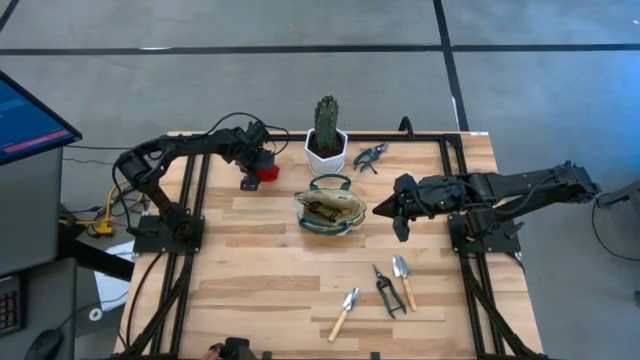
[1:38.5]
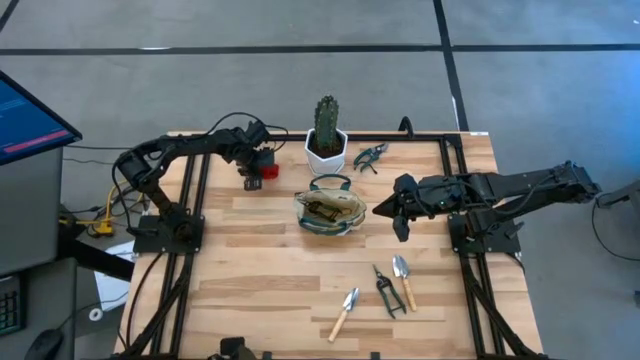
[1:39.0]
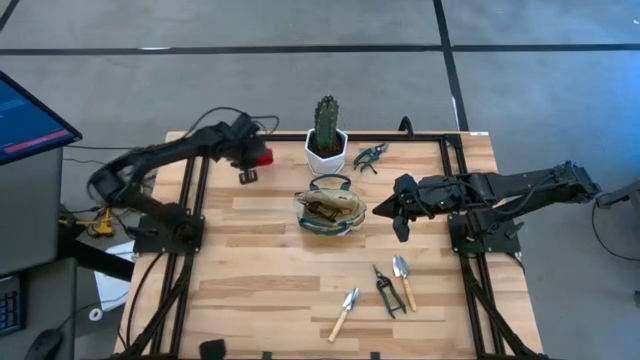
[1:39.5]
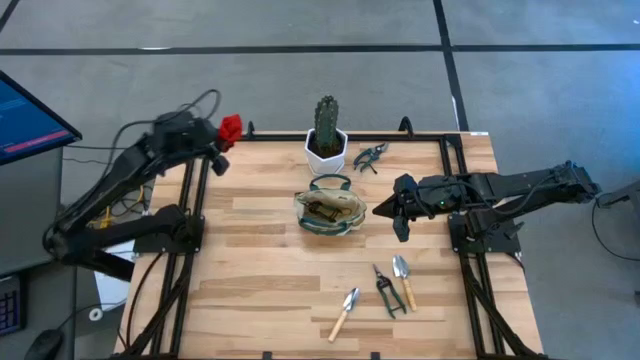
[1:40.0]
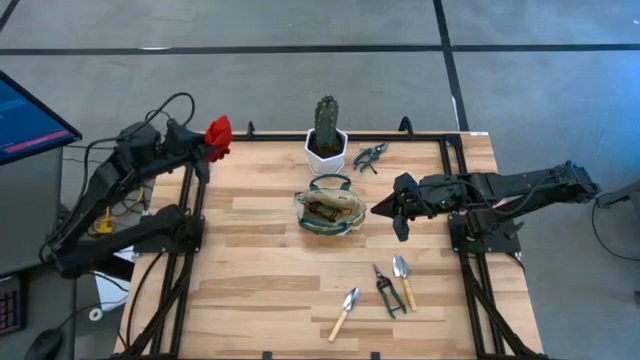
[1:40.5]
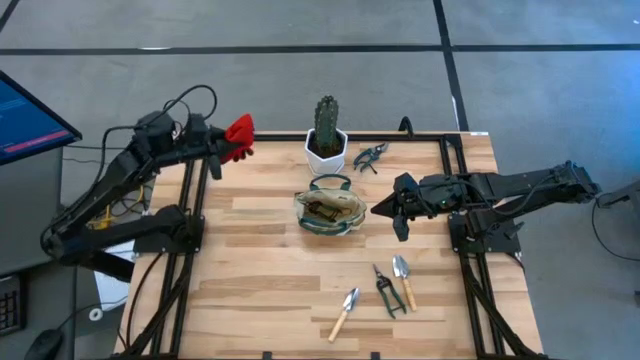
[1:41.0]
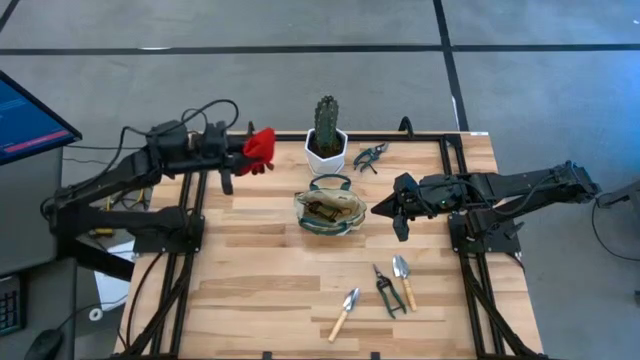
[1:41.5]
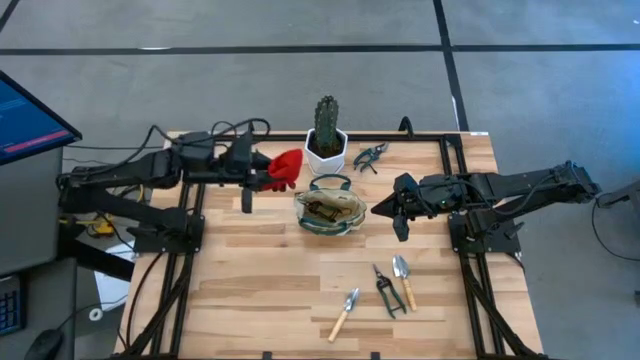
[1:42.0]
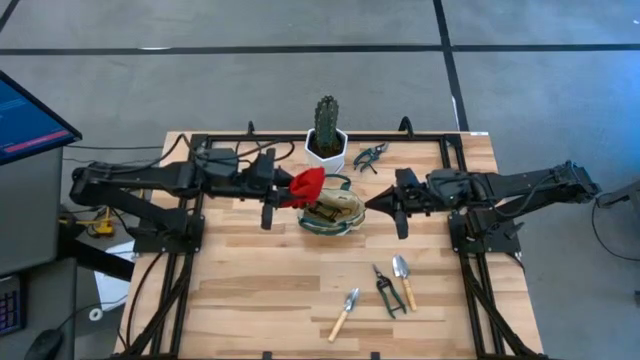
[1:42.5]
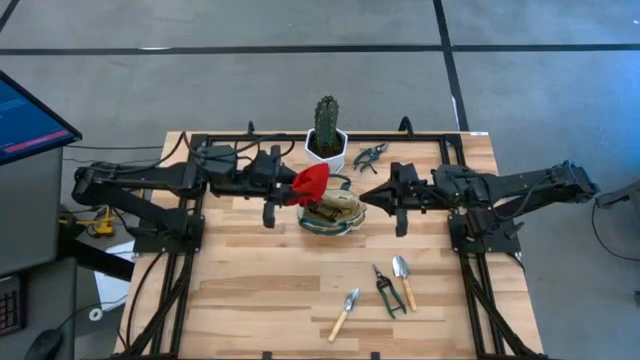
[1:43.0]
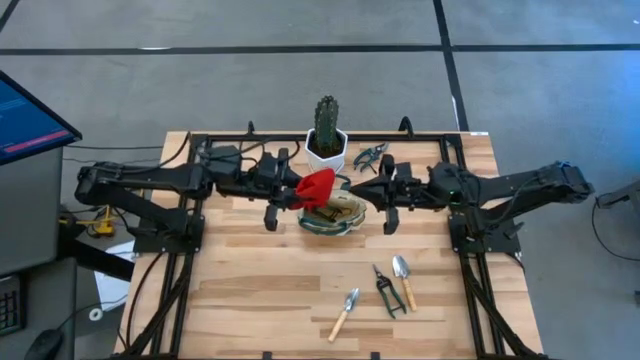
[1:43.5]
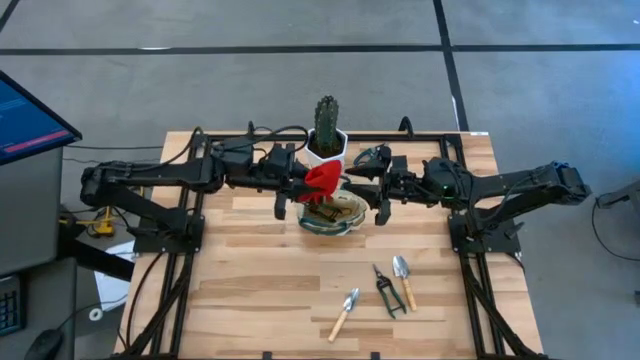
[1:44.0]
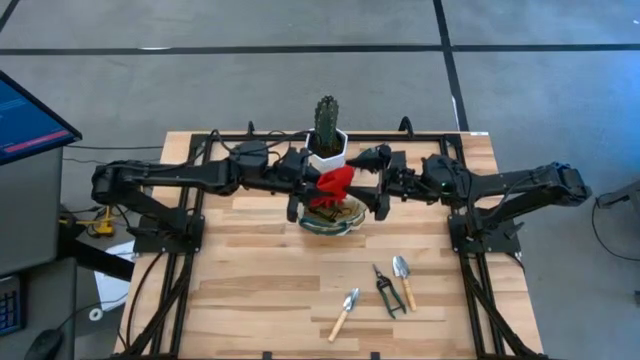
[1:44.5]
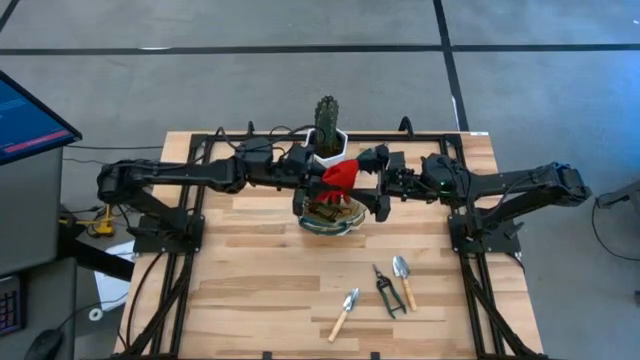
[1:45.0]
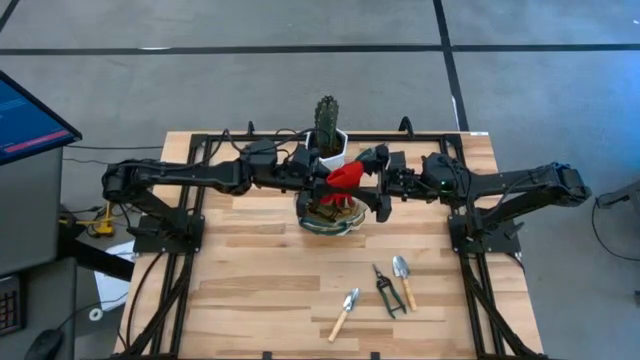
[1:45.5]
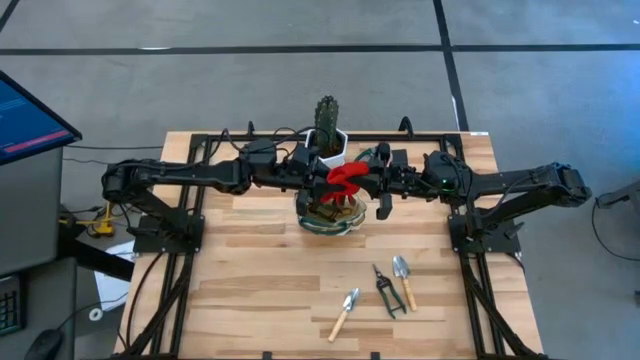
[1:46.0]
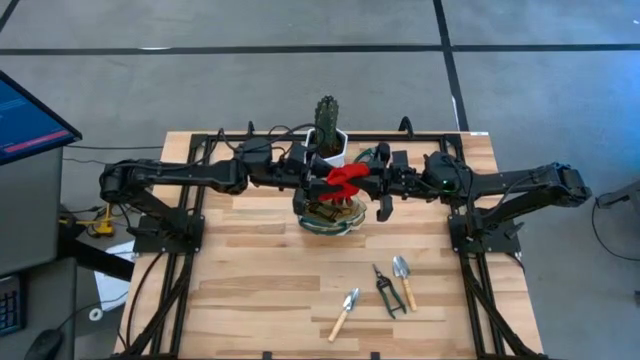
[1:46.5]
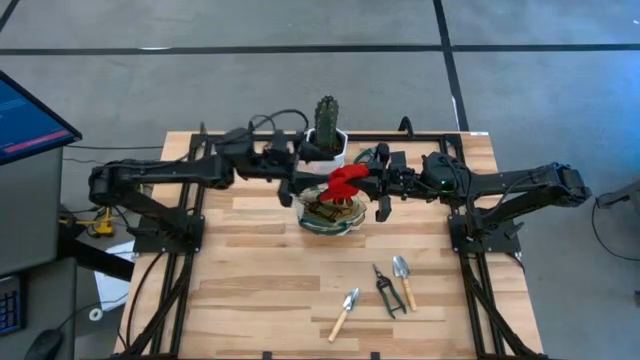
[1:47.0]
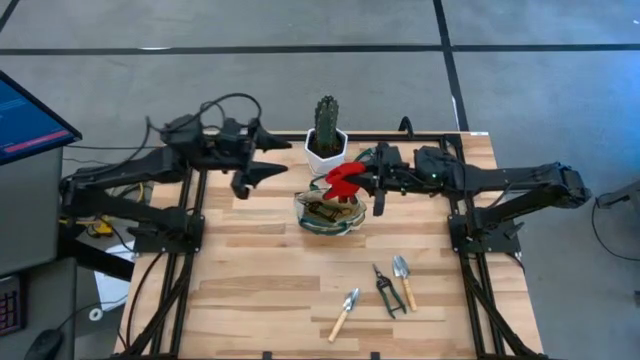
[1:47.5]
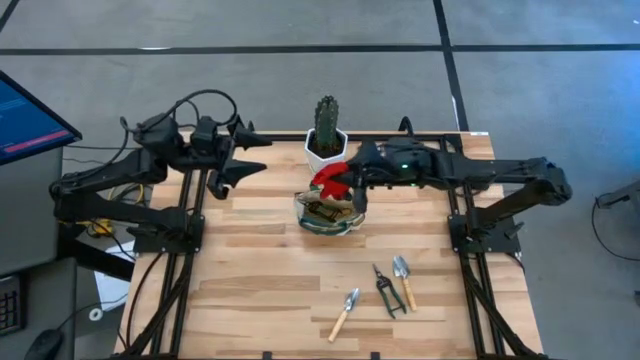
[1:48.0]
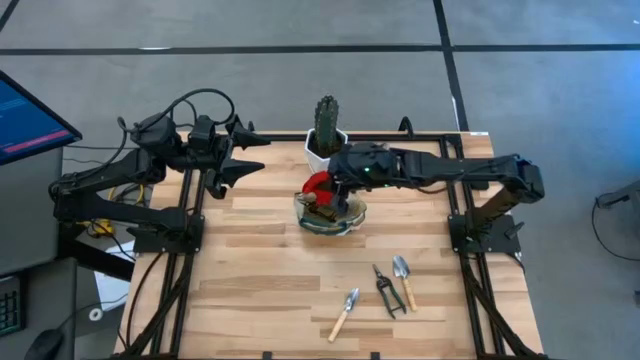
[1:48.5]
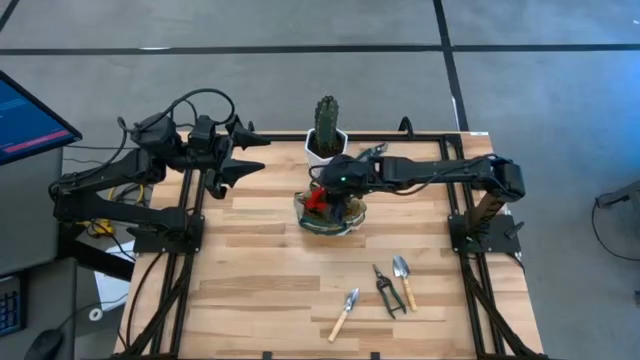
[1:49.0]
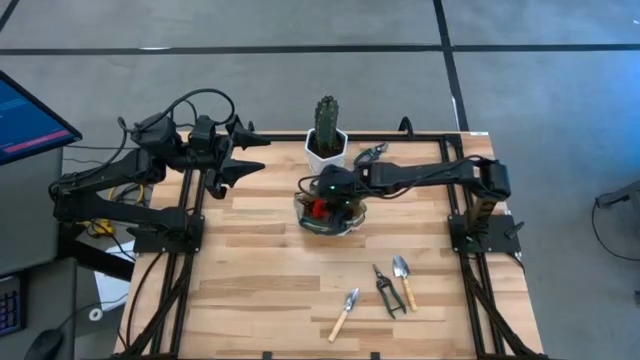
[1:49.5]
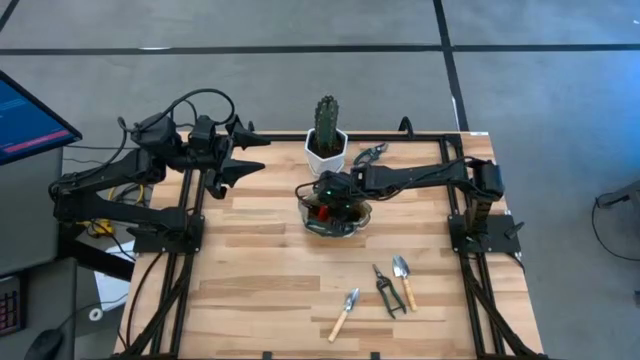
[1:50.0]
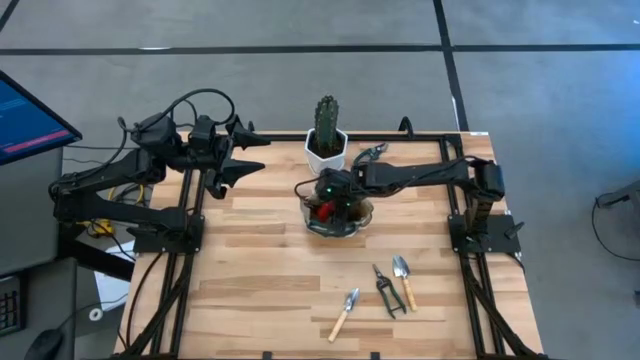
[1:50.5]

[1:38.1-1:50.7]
Task: Pick & Place Garden tools in Gardening bag
Put the red gloves into the gardening bag

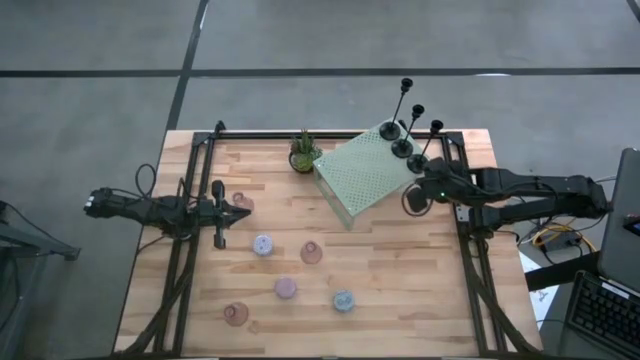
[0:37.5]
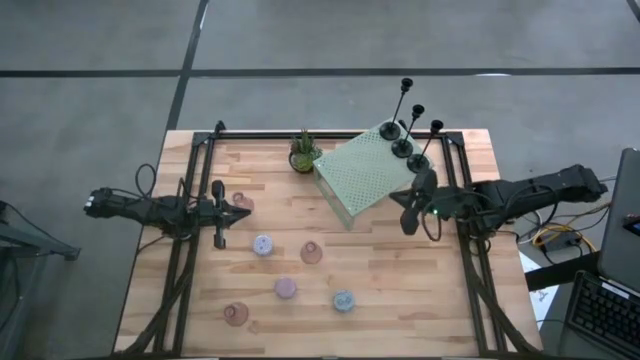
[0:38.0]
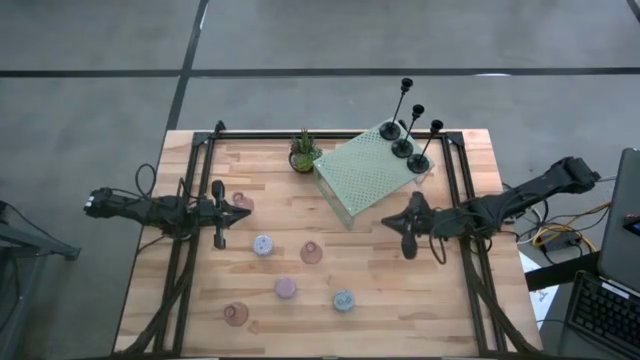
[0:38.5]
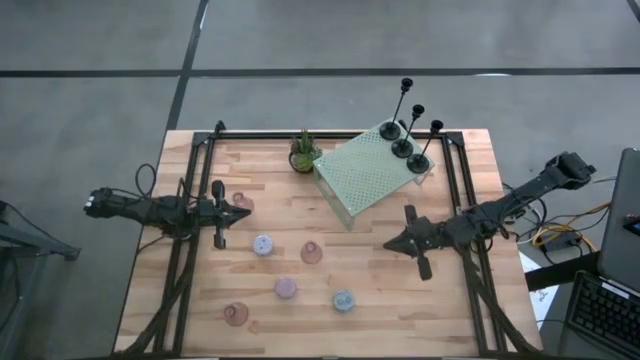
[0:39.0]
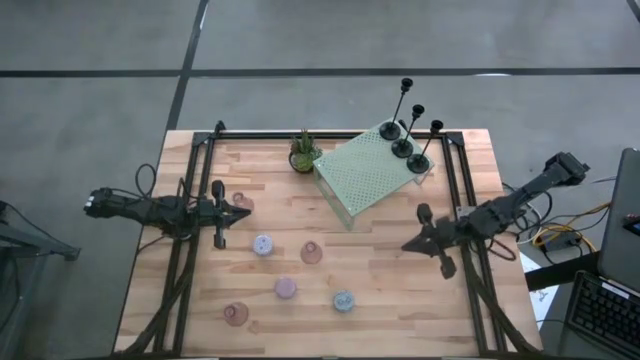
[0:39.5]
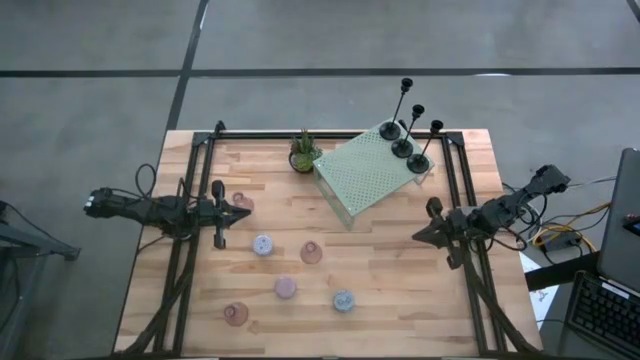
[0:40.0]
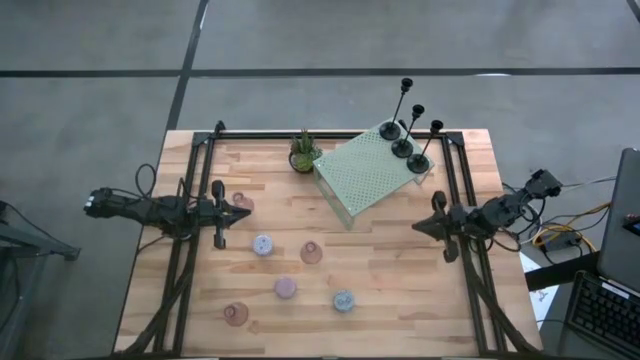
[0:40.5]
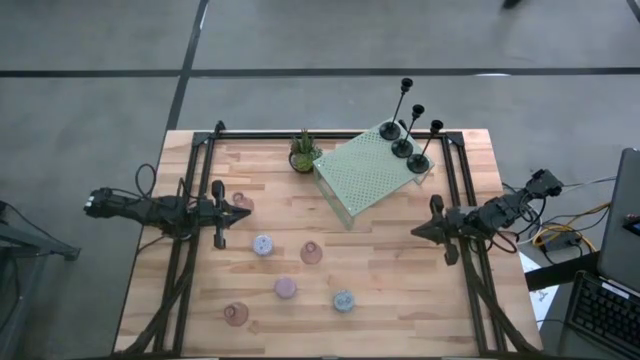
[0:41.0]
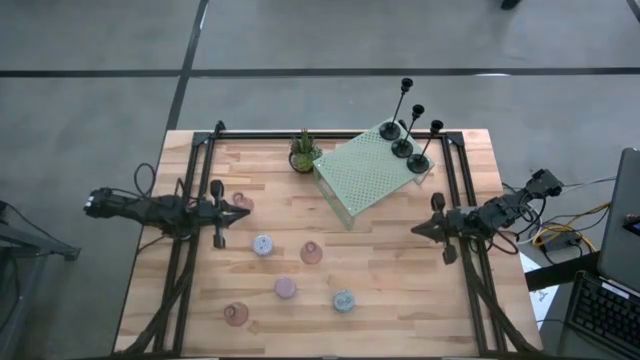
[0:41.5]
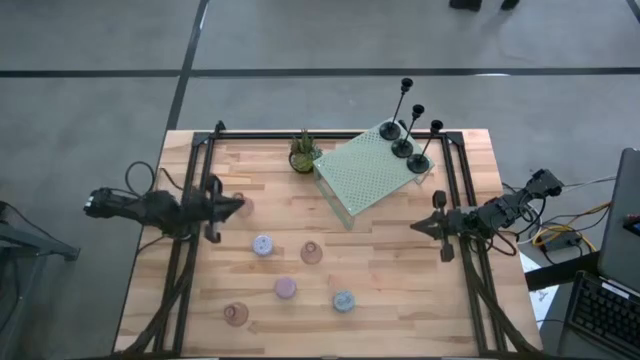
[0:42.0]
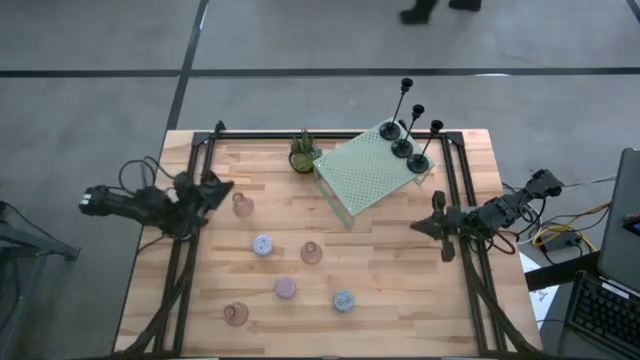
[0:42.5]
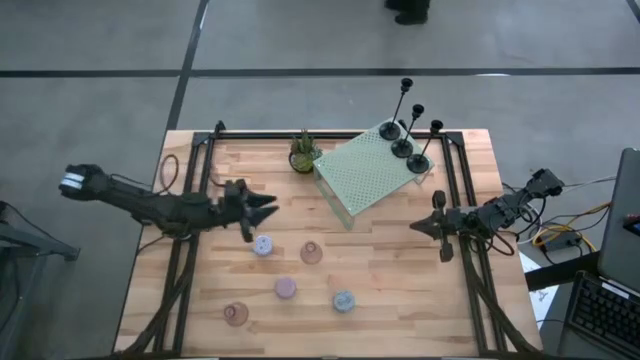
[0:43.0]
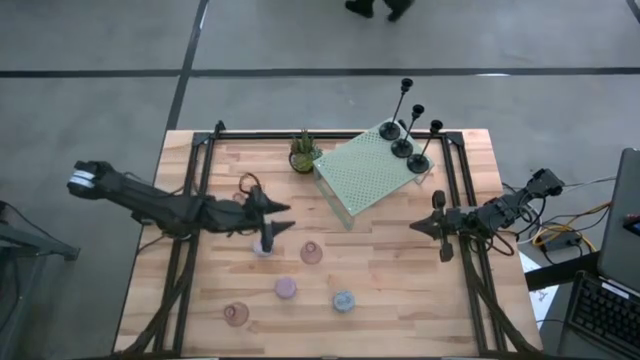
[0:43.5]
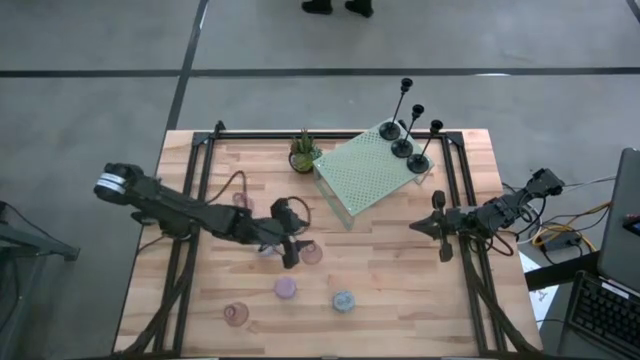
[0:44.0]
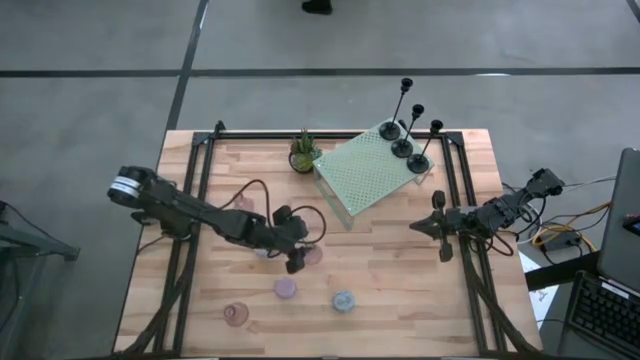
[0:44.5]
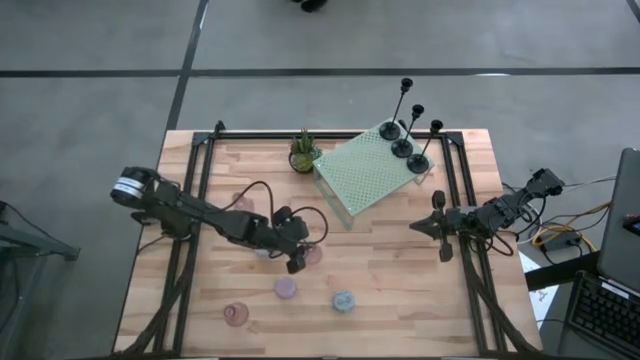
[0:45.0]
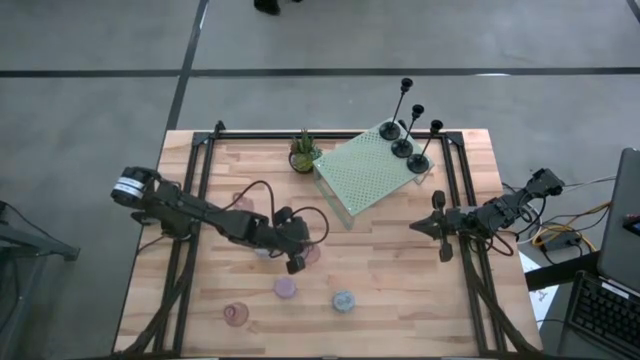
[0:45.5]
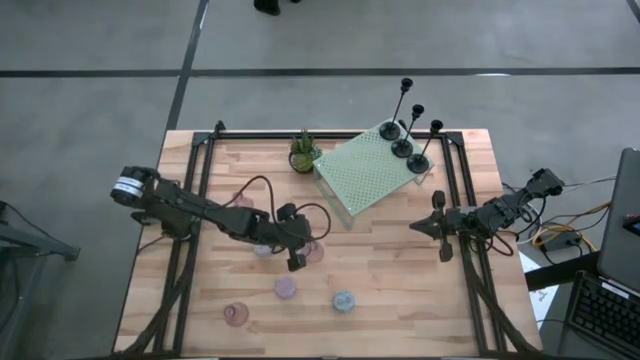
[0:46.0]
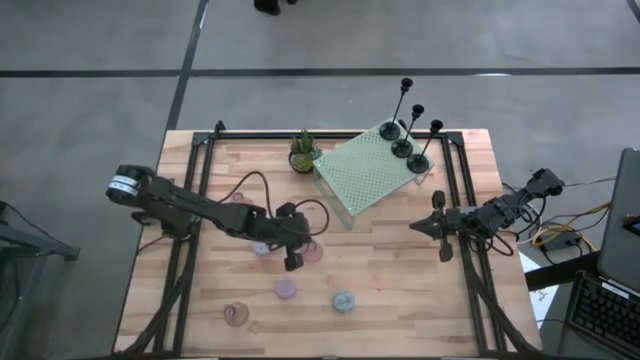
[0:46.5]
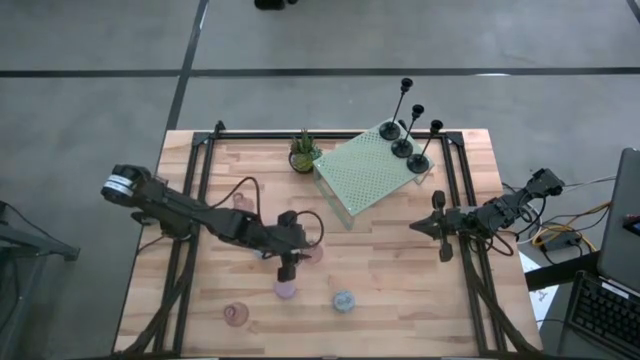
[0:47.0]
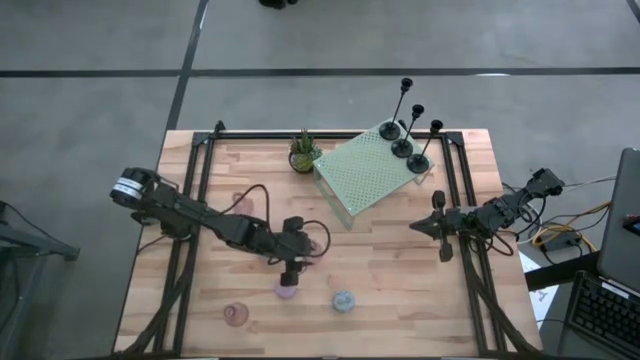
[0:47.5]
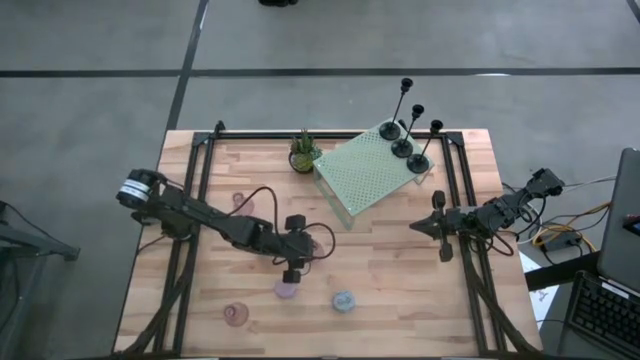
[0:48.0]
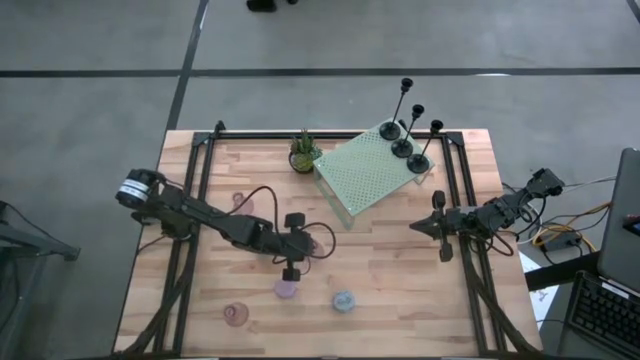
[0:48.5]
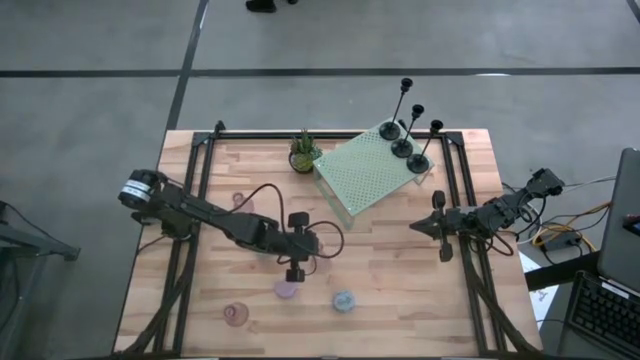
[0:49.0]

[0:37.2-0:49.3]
Task: Pick & Place candle stick holders
Put the right pink candle holder on the shelf
